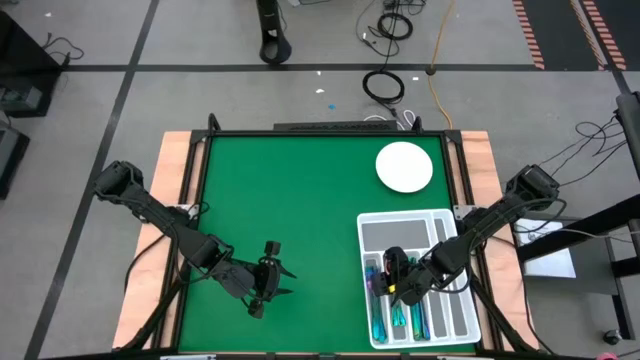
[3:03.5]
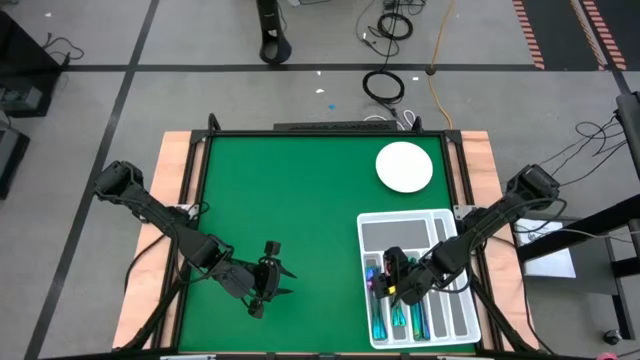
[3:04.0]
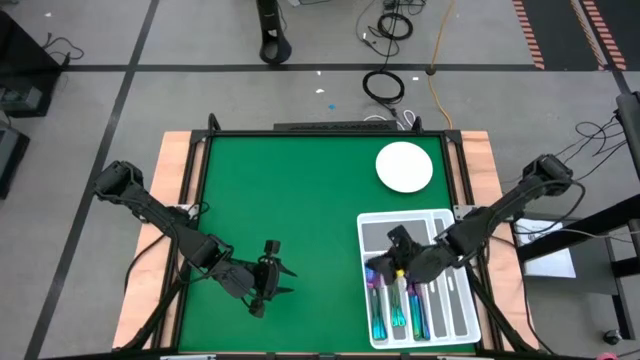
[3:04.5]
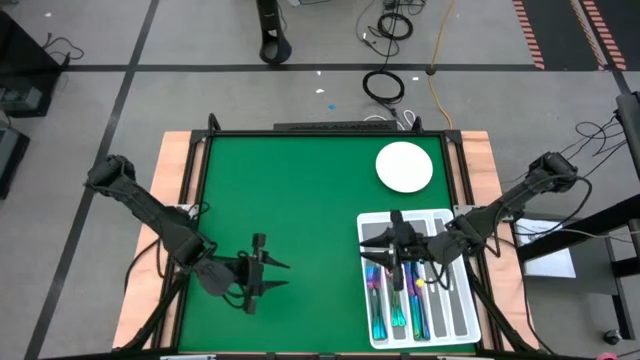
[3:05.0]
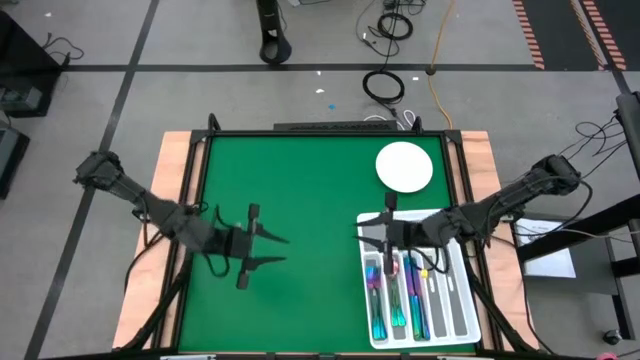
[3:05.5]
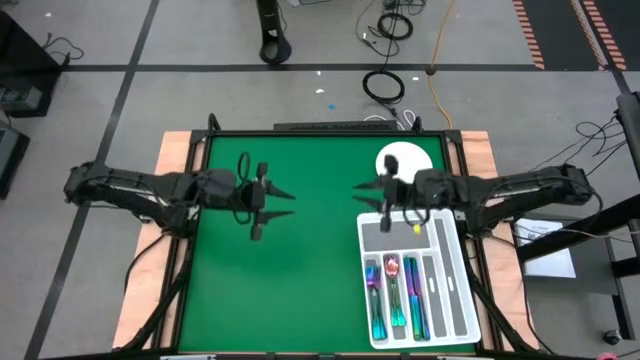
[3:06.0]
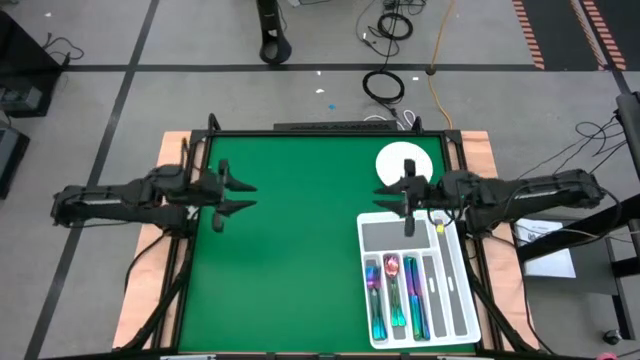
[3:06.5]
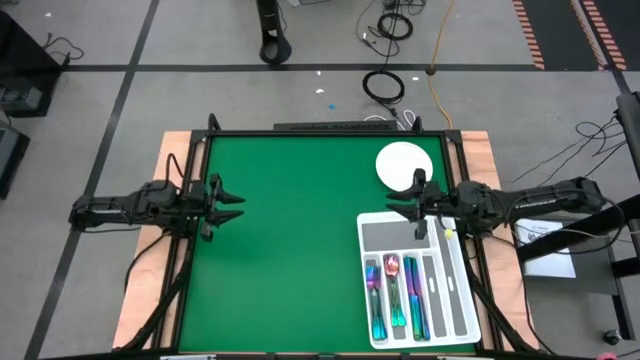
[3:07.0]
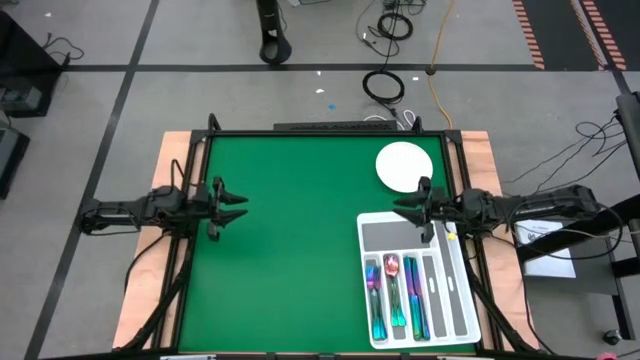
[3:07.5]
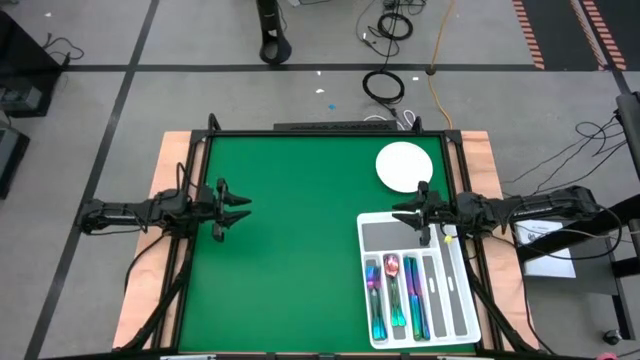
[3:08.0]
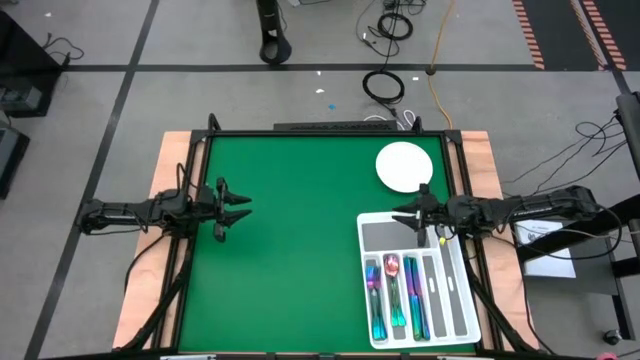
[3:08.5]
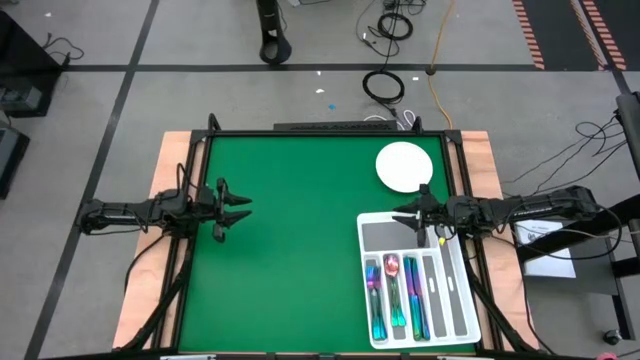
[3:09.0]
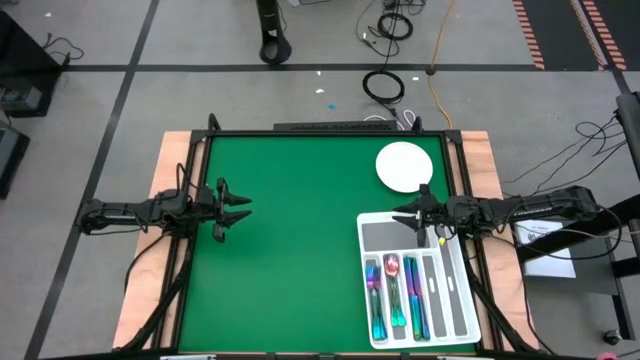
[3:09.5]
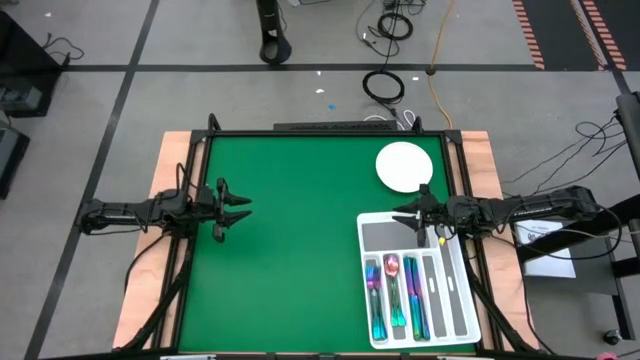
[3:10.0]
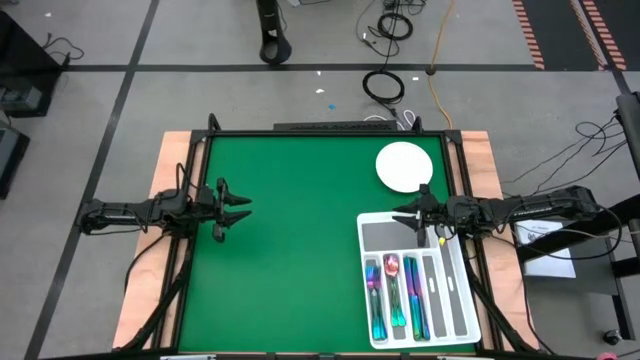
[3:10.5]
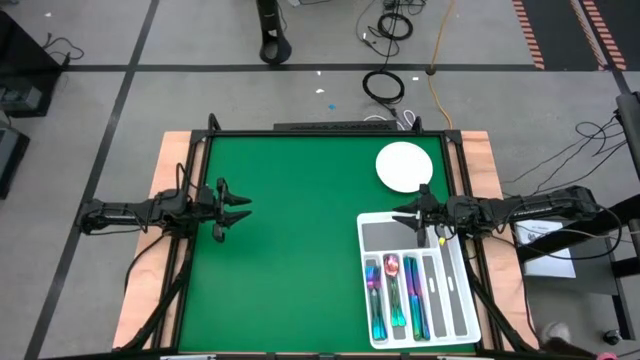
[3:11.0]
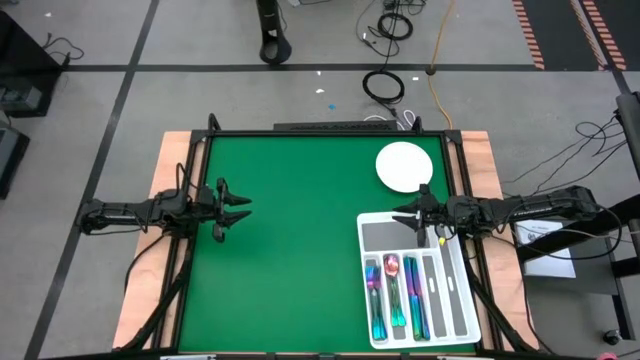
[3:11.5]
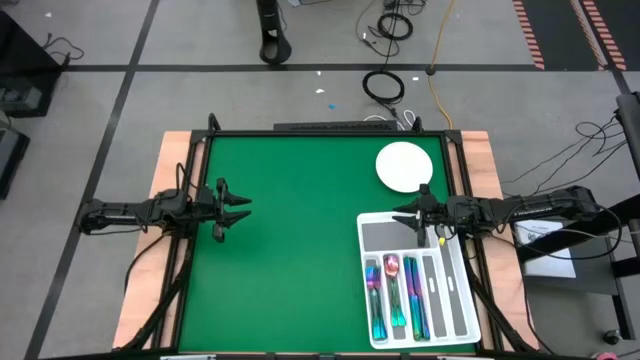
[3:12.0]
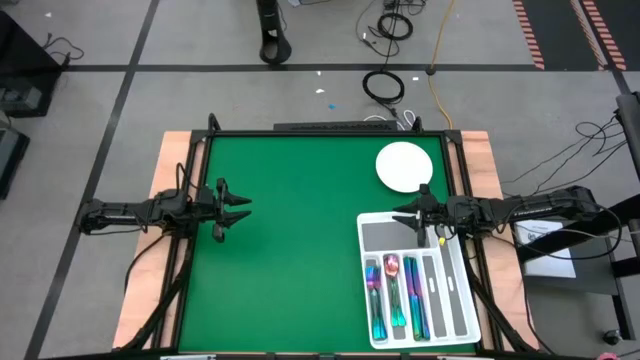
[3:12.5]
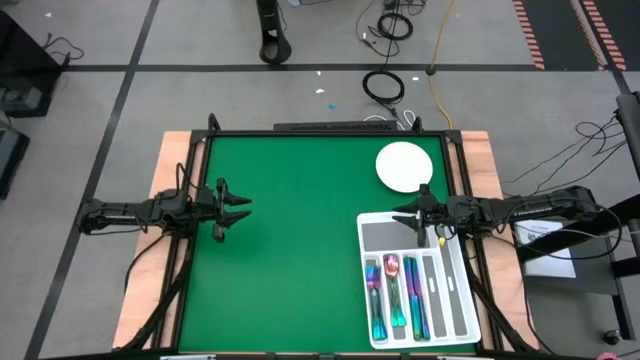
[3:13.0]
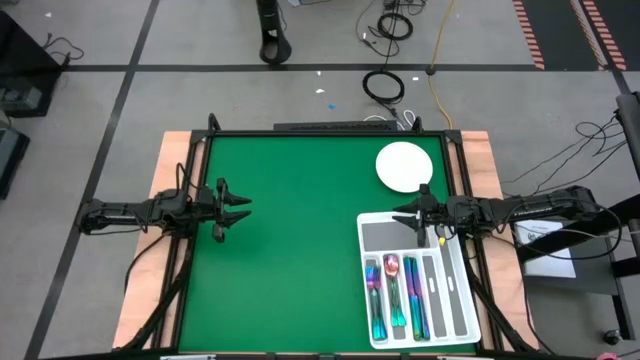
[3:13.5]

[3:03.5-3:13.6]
Task: Sort silverware
Return to Home Position

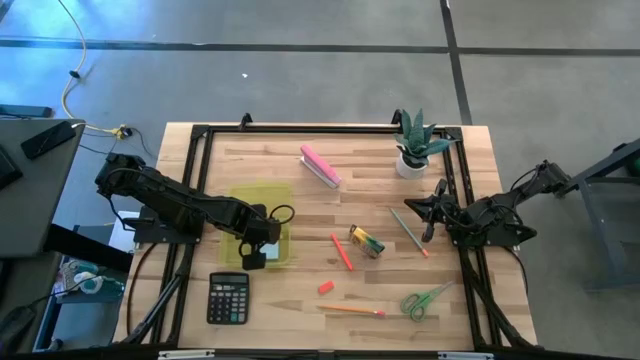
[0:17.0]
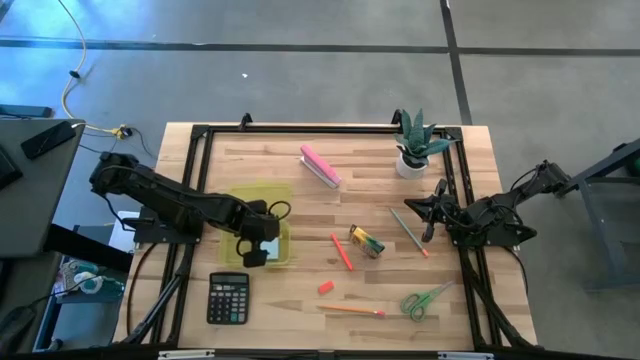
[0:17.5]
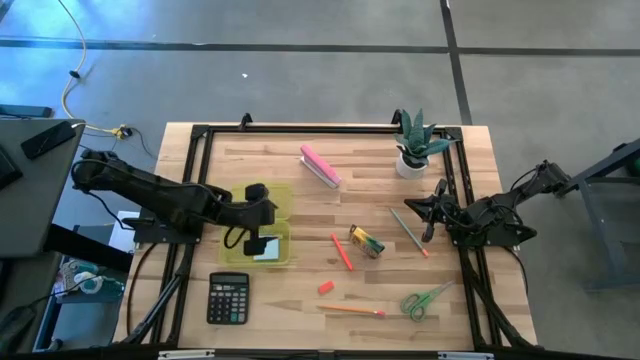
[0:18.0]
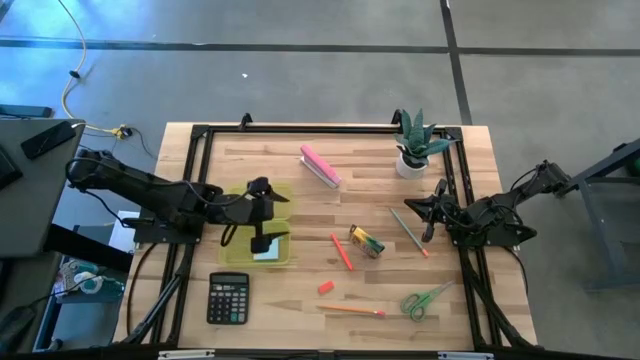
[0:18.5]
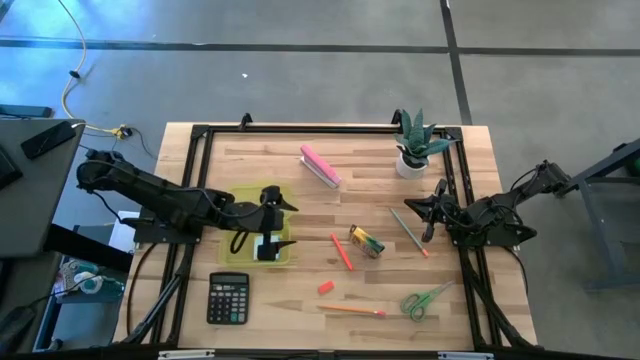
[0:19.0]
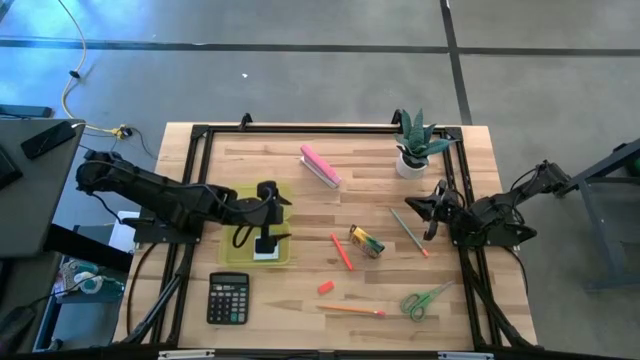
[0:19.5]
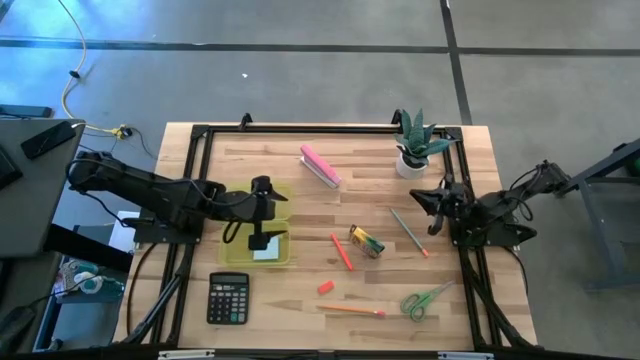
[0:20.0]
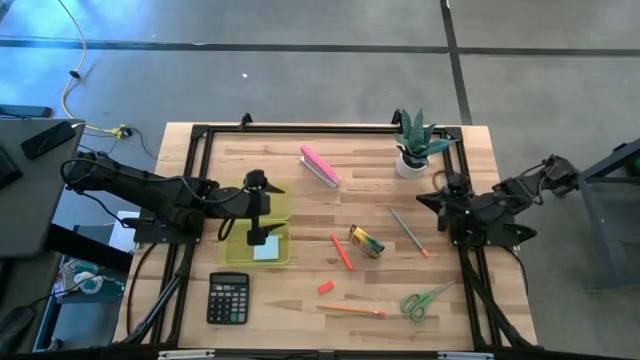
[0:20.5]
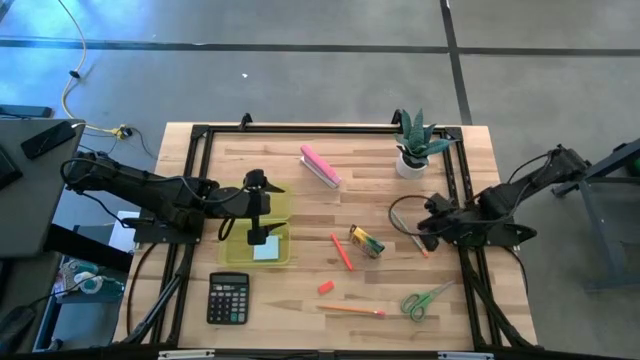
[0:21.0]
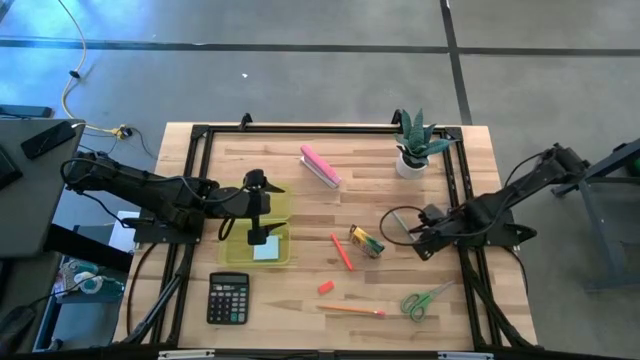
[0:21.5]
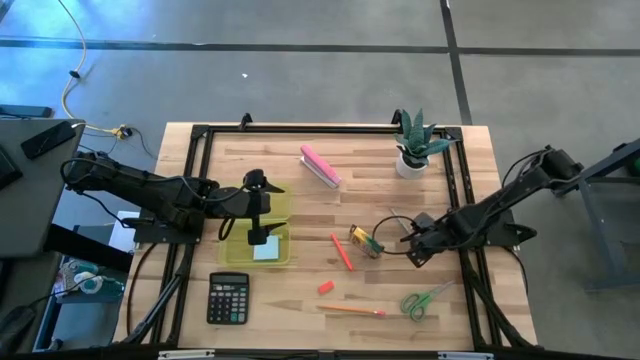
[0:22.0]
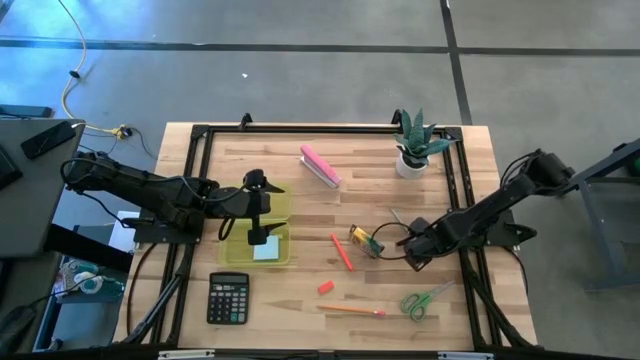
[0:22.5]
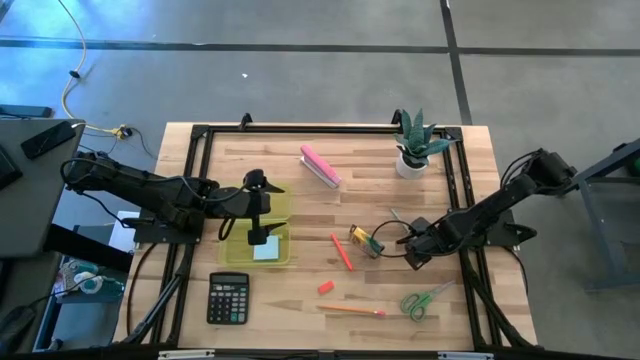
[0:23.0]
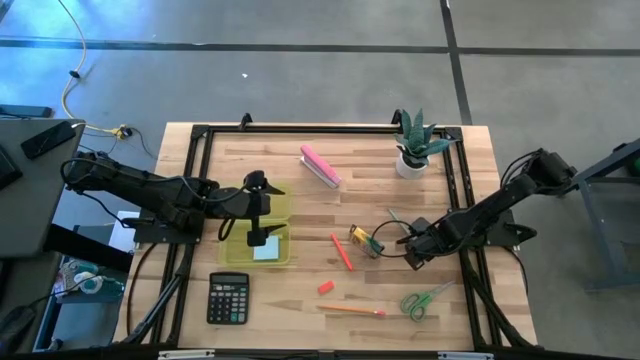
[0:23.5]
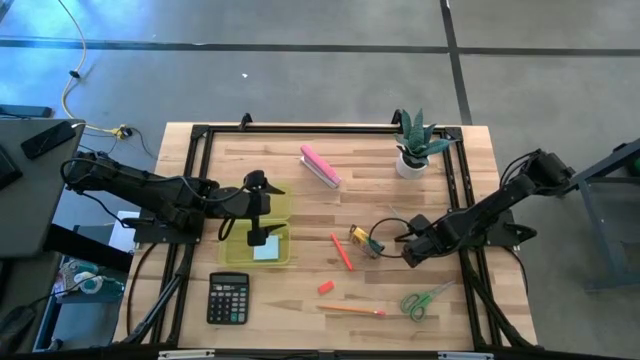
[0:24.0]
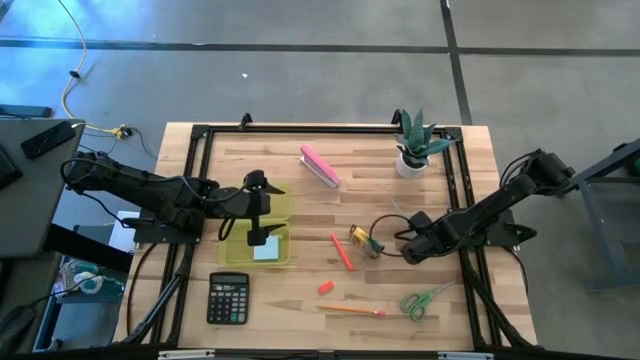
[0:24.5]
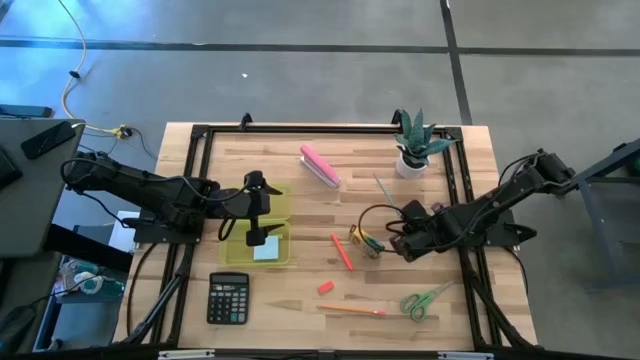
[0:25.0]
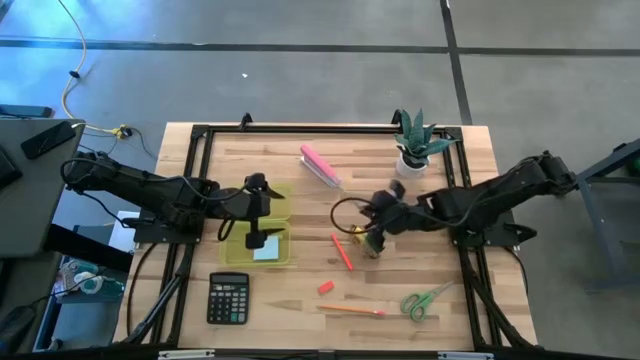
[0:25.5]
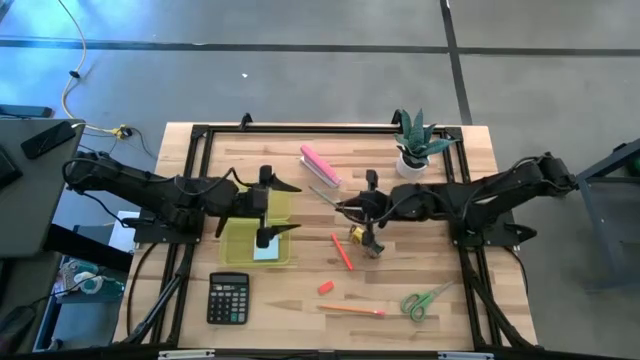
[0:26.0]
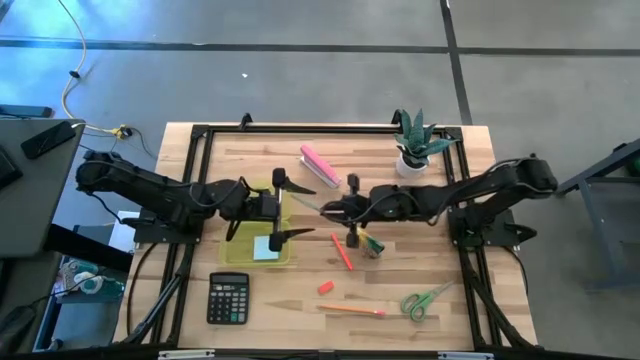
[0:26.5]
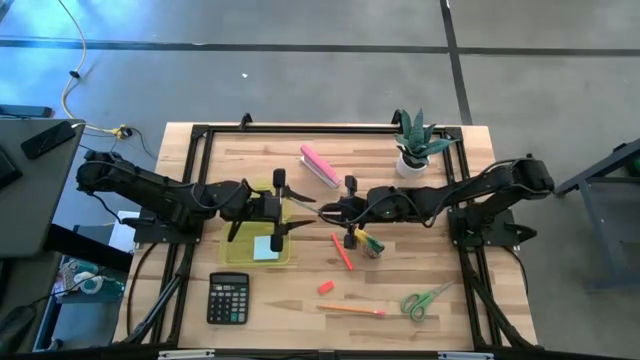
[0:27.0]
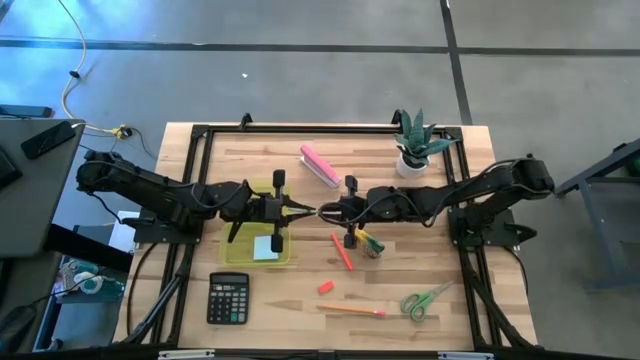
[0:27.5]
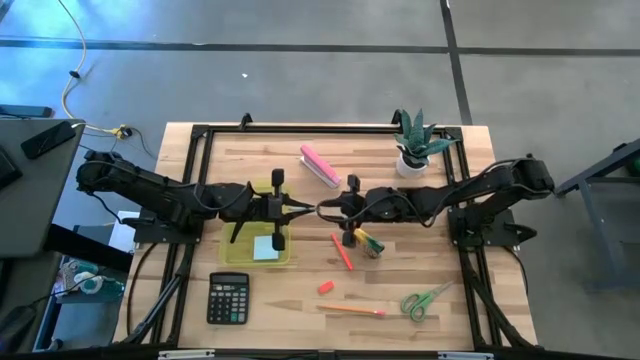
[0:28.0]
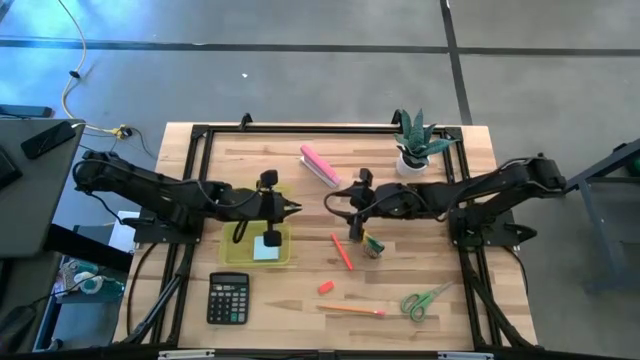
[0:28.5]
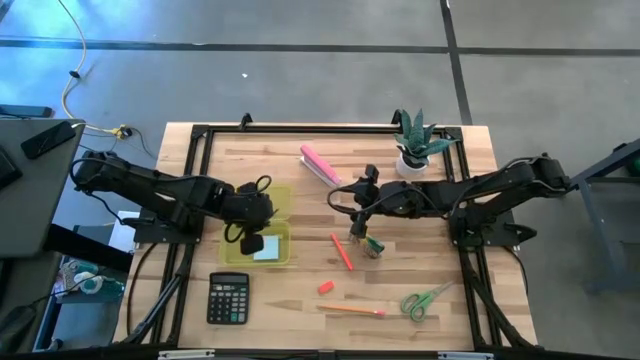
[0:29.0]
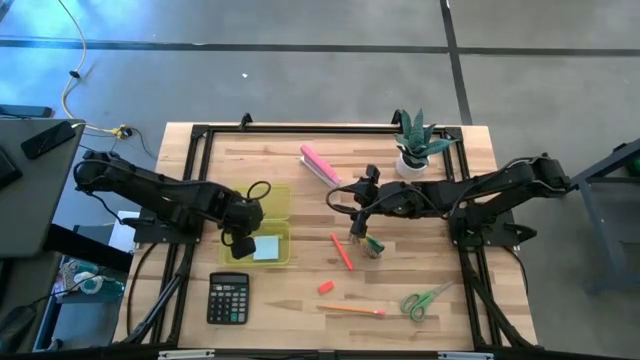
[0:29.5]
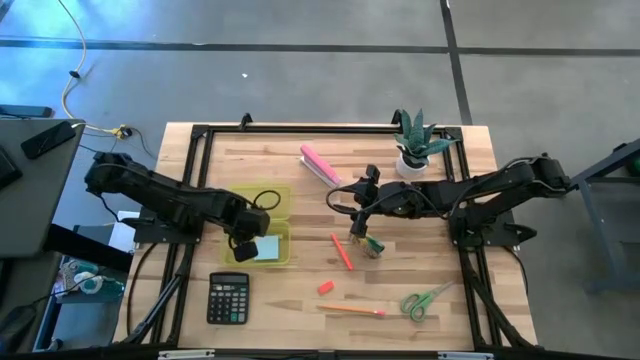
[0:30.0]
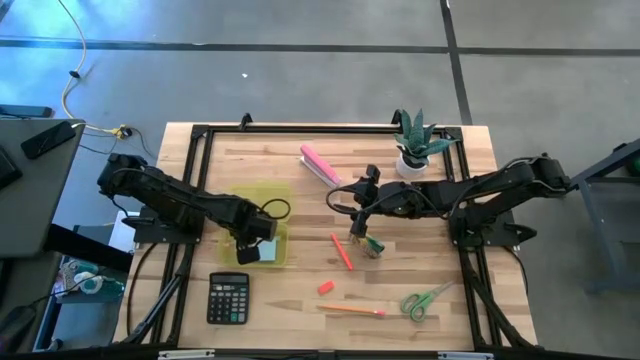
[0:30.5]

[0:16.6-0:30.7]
Task: Pack school essentials
Put the blue pencil into the yellow supply box
